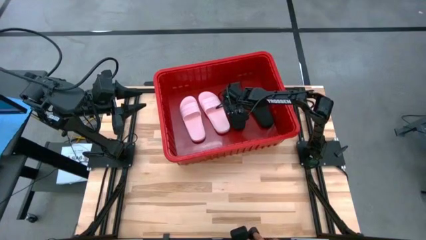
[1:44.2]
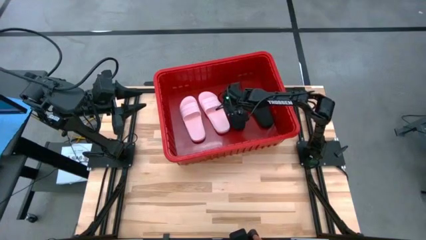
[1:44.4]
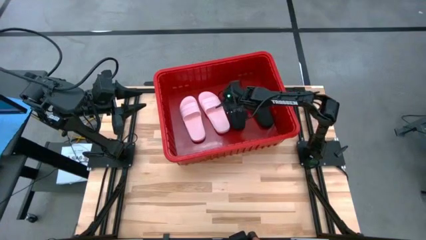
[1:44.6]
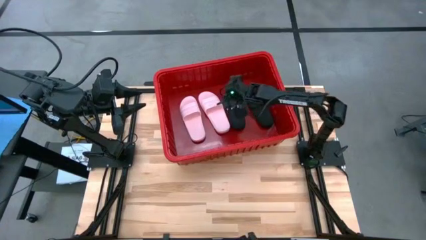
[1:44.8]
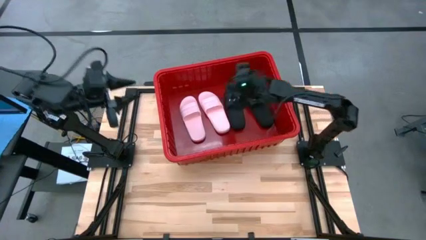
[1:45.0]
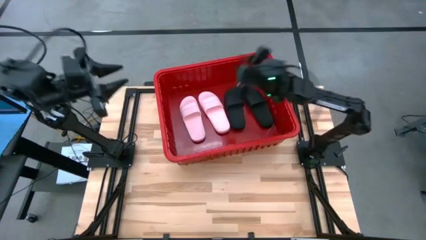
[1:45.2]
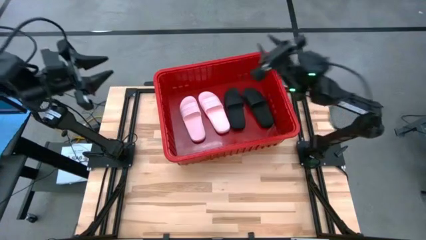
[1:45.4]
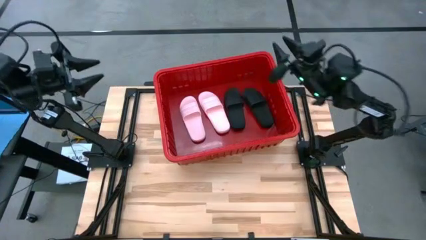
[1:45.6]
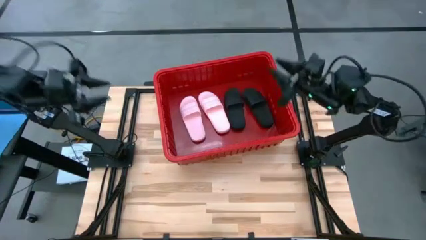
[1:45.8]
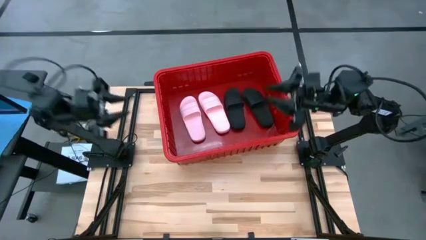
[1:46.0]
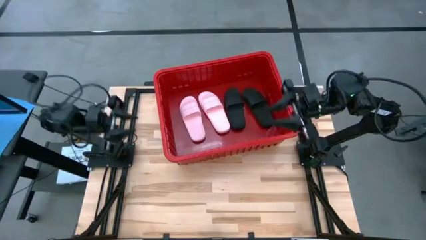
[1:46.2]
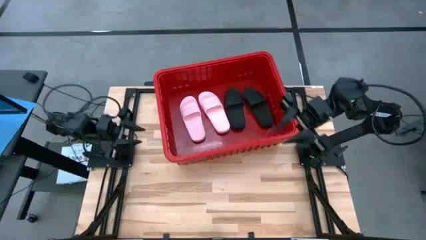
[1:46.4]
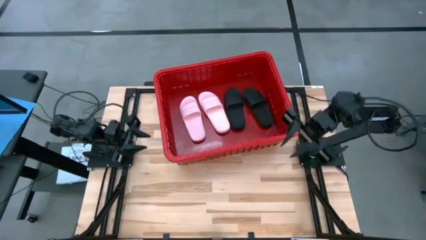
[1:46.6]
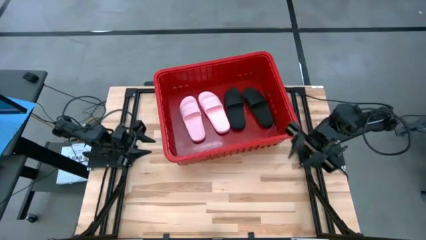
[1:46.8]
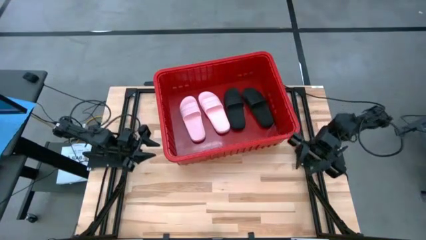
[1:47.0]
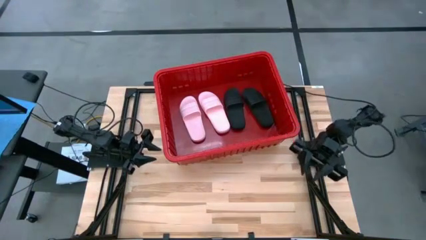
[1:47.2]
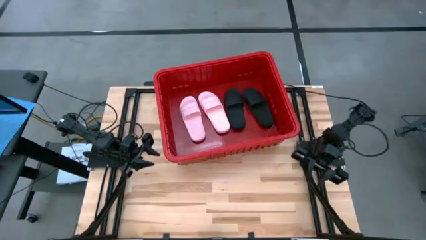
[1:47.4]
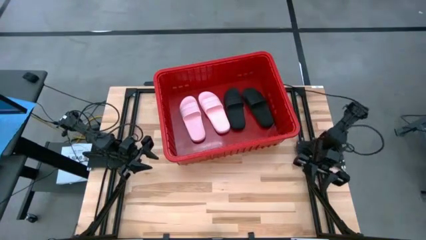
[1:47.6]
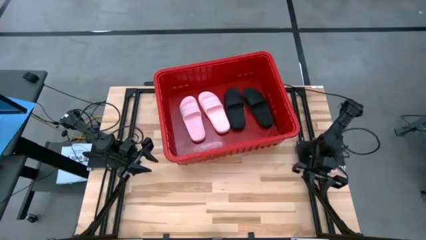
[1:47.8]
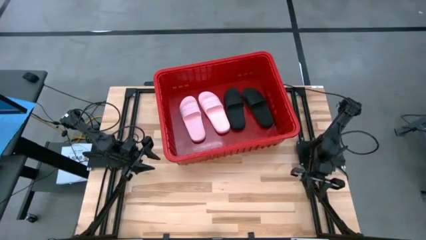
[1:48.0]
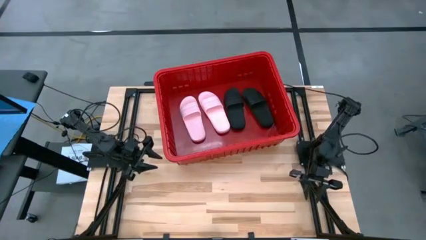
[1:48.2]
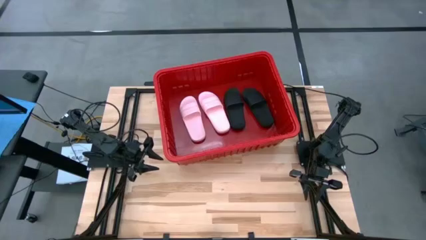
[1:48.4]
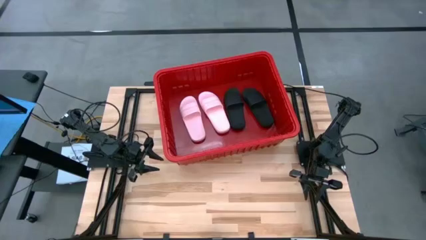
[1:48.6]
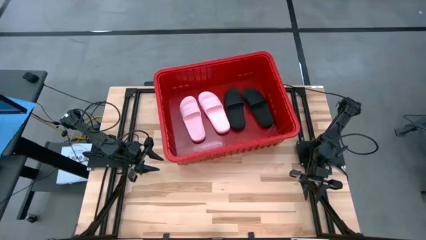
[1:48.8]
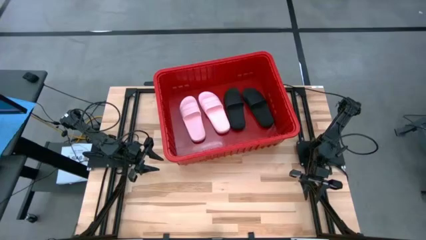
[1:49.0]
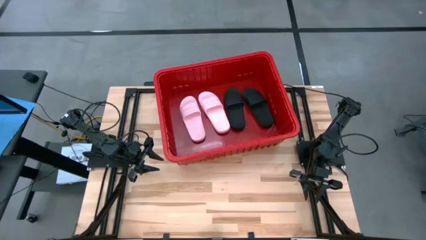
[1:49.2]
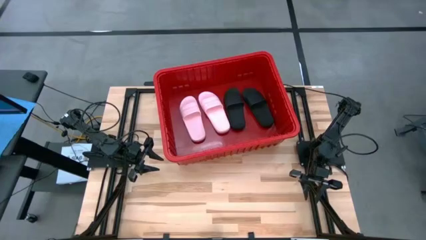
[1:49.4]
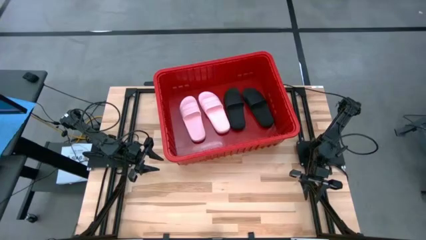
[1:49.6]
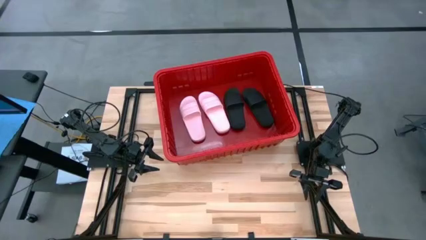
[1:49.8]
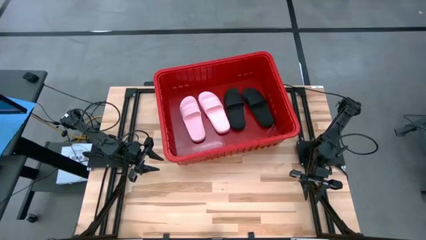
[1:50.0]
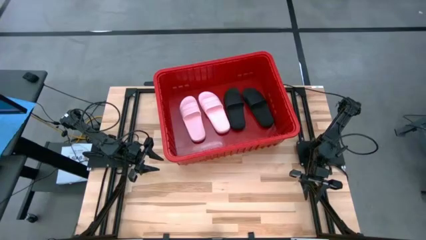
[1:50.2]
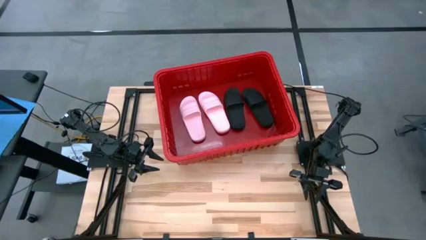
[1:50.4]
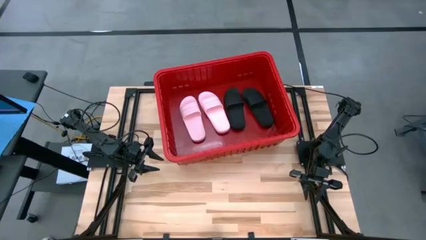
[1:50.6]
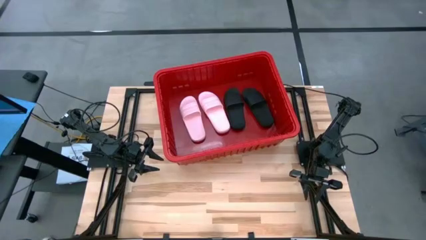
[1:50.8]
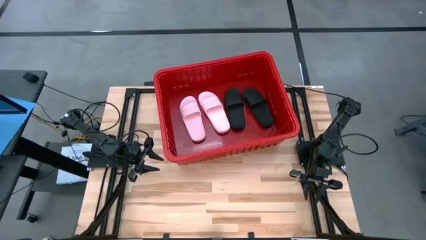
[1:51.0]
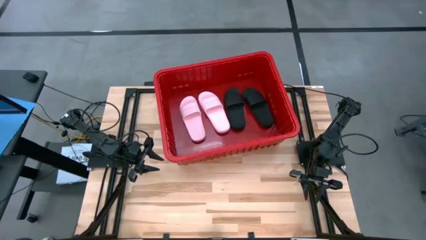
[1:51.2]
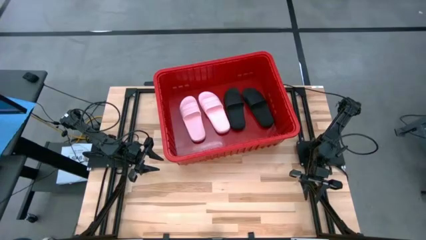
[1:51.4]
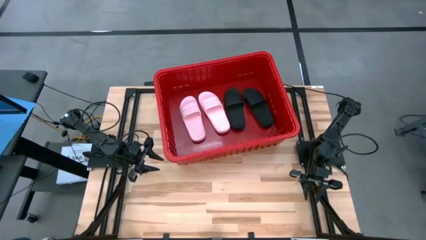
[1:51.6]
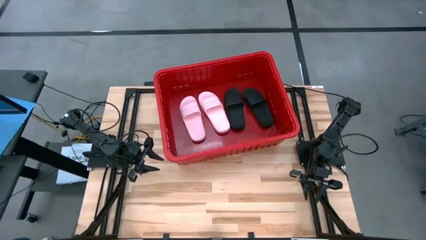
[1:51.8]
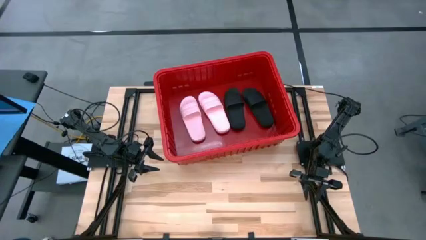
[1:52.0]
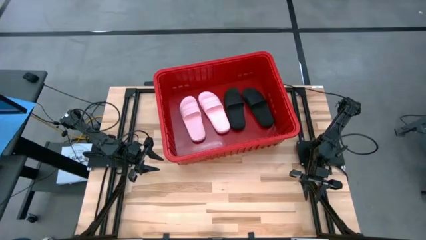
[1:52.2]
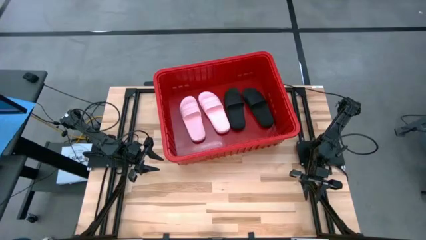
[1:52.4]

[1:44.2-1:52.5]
Task: Pick and place slides into bin
Return to Home Position

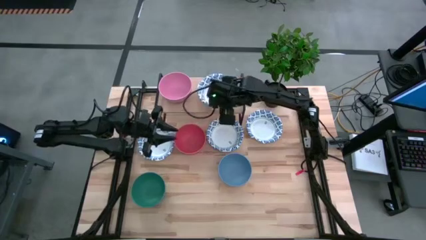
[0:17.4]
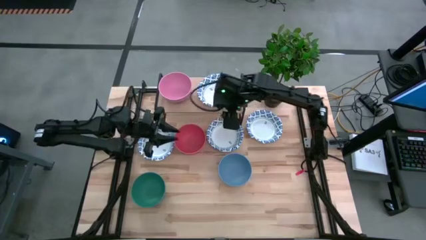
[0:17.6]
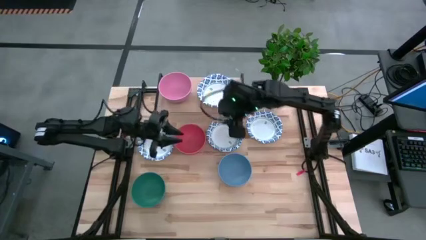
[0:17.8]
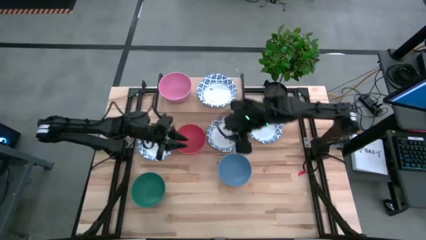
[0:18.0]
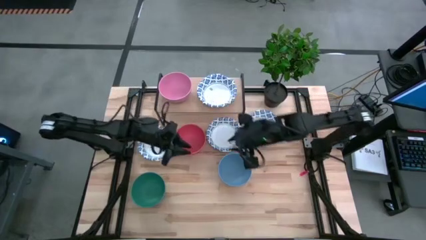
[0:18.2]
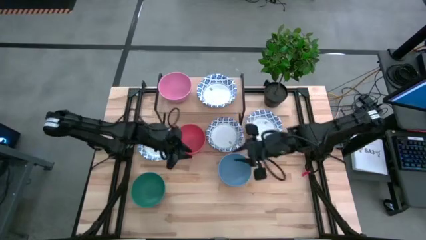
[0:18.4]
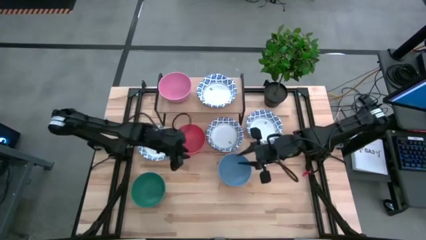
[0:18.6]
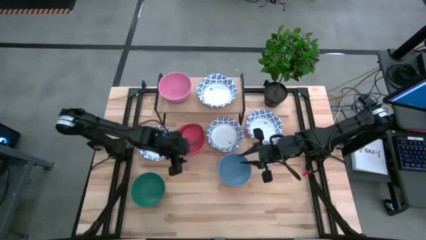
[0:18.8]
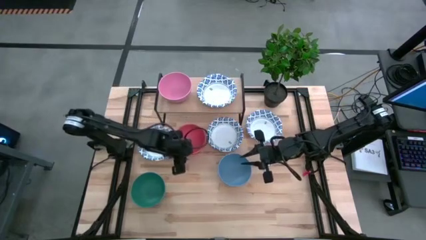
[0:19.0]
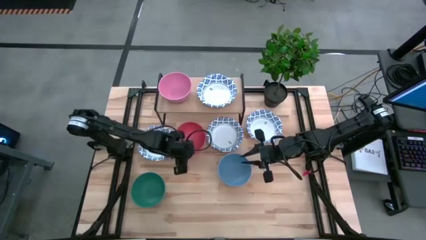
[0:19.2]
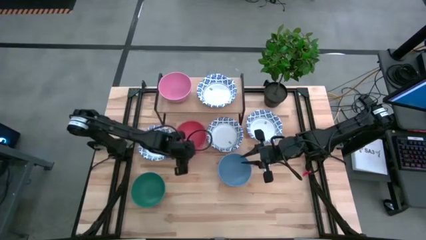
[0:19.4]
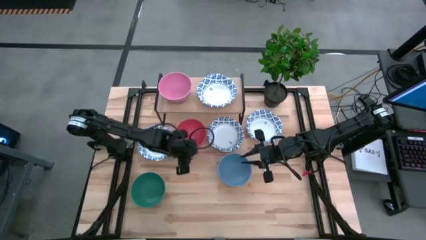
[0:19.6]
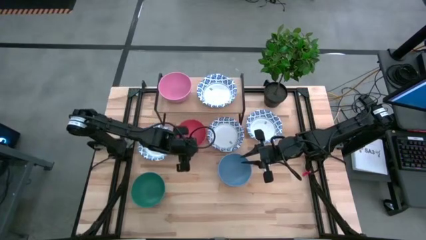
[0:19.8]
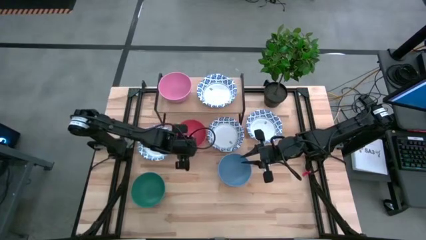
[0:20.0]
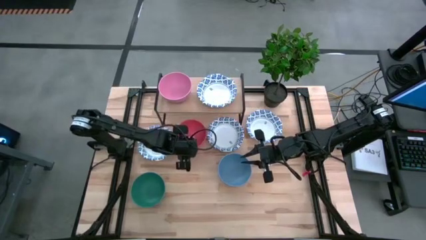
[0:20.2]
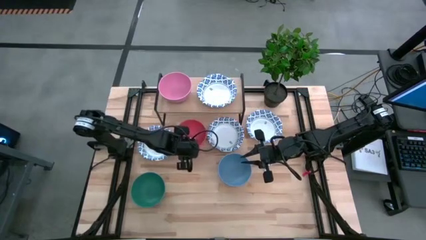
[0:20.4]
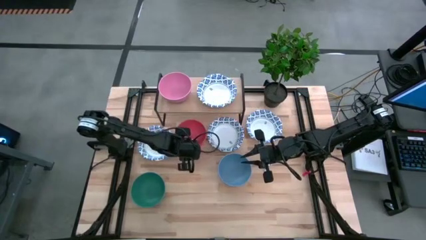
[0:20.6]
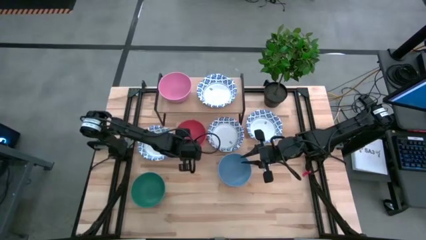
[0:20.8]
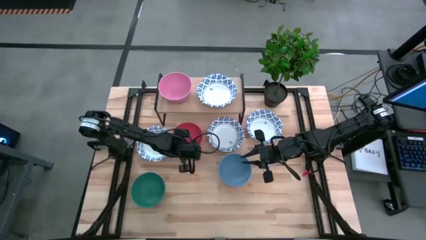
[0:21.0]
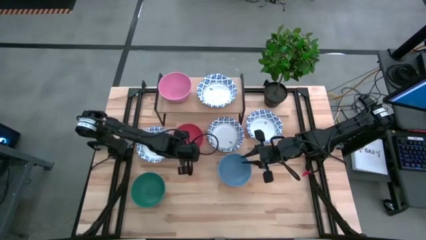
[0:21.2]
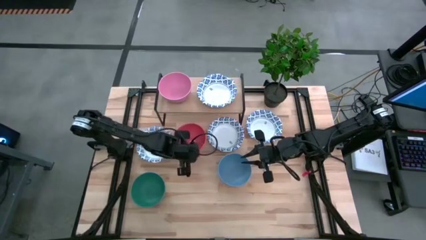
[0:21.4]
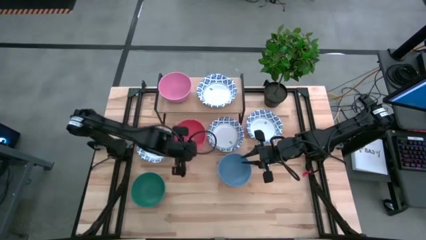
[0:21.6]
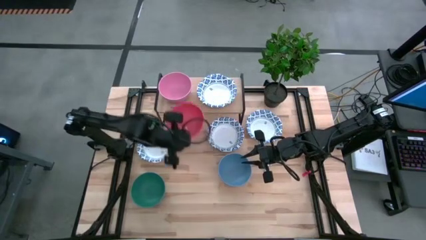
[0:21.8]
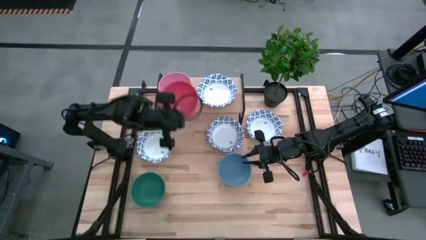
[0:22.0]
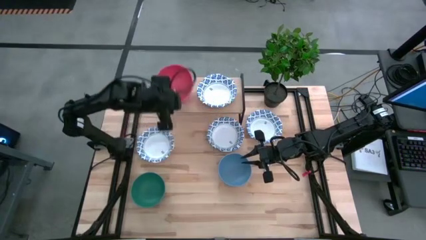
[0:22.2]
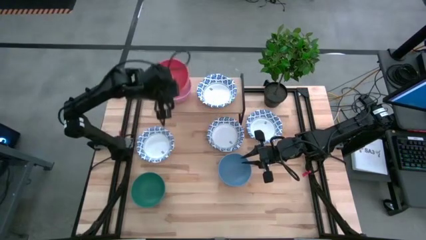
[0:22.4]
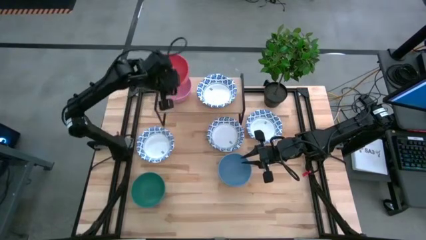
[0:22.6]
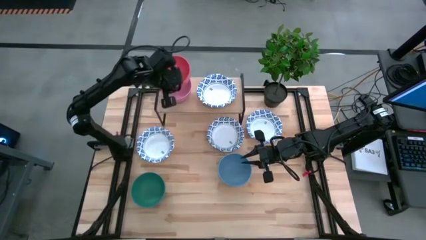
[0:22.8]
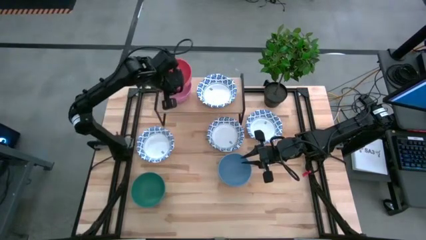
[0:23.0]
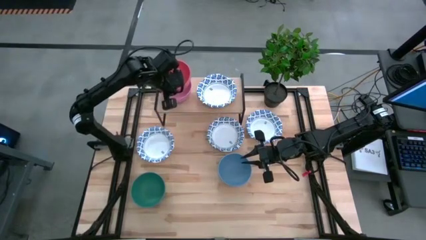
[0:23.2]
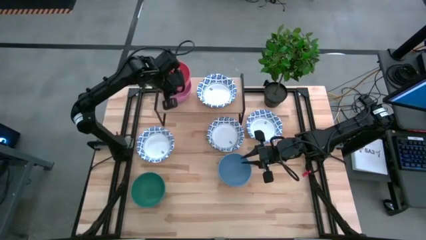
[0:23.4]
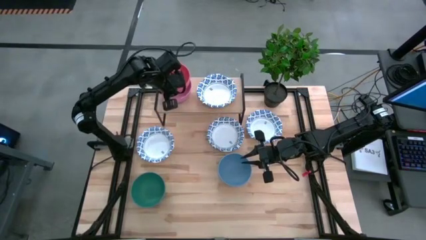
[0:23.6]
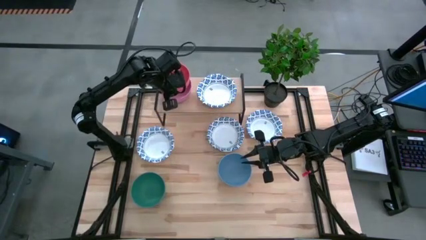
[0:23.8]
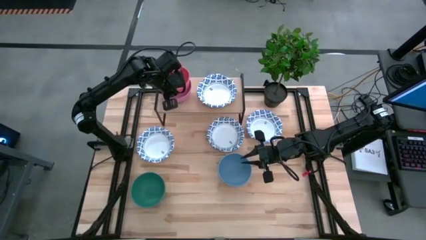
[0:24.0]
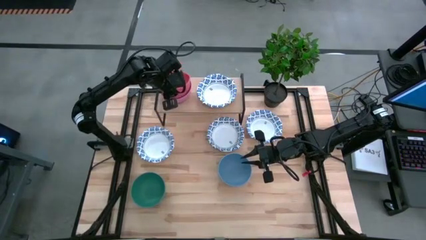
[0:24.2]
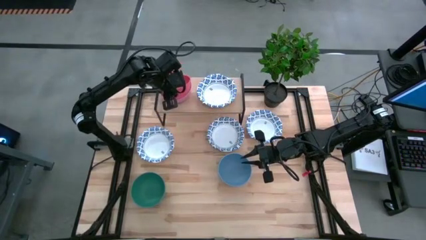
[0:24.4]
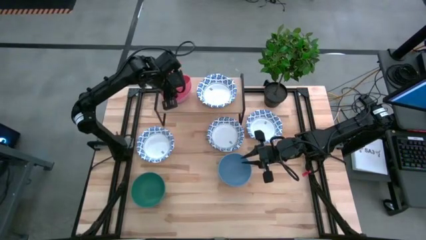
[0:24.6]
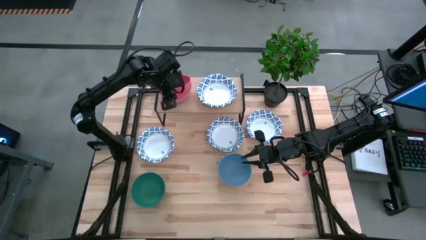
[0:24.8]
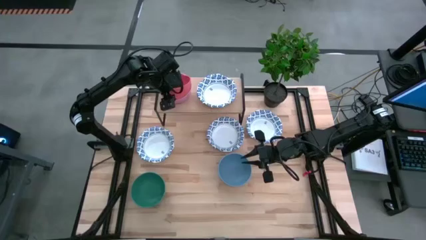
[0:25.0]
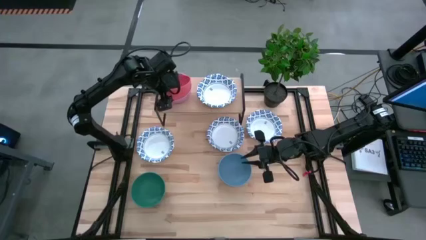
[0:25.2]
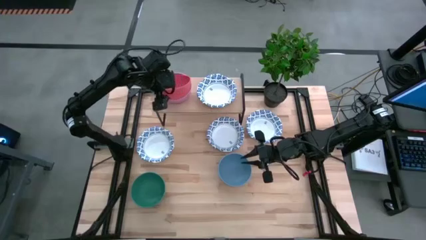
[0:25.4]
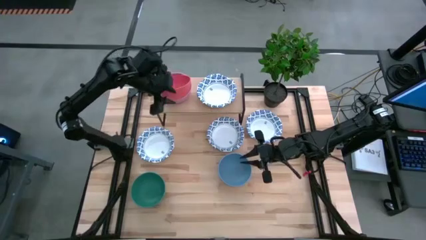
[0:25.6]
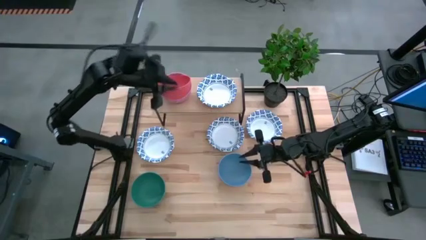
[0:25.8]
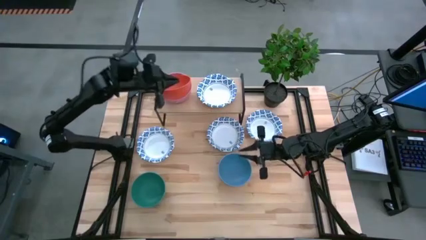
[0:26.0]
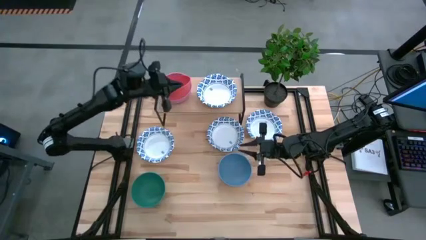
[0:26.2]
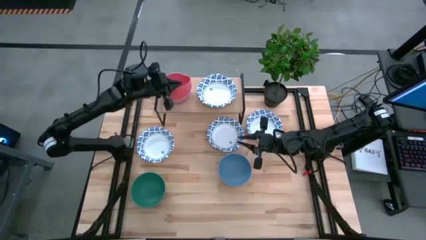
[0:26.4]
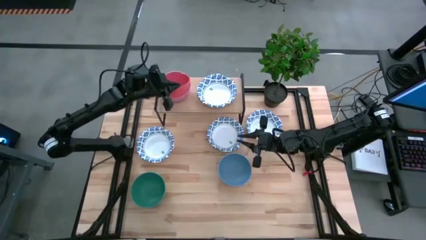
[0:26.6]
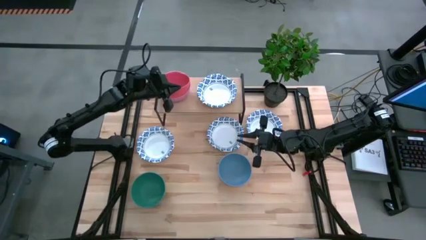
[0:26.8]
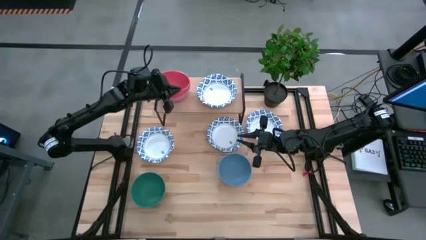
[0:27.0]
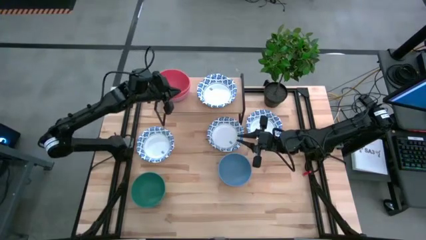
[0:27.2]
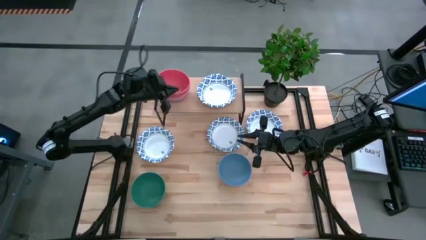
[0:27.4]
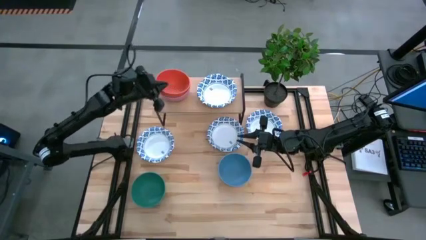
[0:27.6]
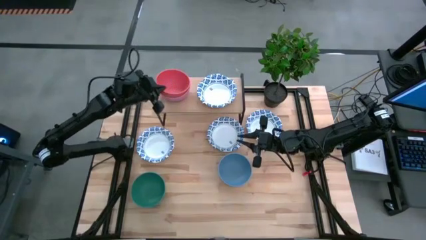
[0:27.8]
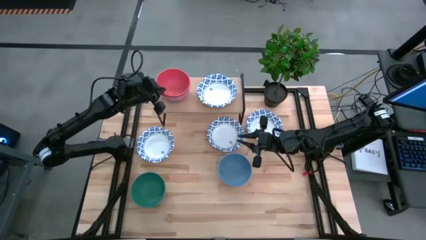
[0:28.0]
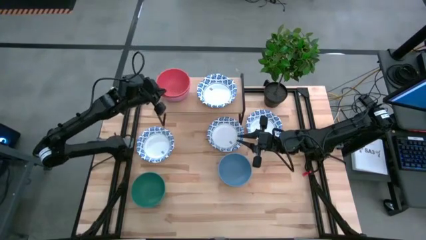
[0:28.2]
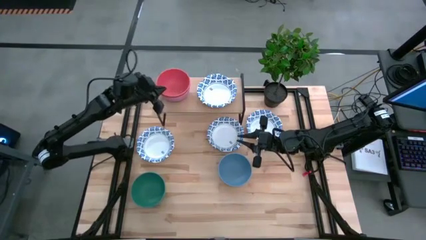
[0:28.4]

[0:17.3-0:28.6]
Task: Place and stack bowls onto a shelf
Stack the orange bowl on the pink bowl on the shelf
